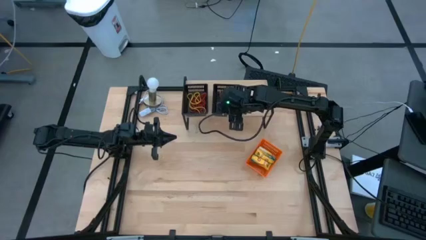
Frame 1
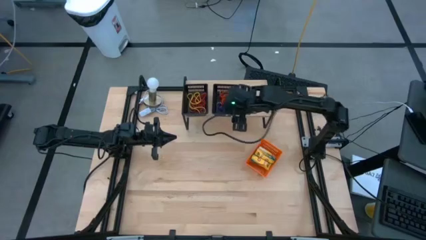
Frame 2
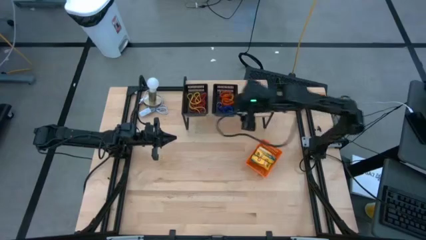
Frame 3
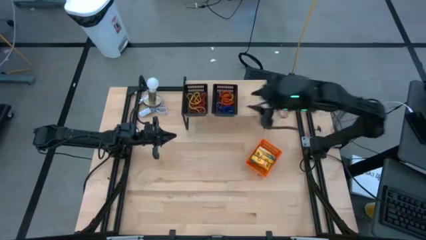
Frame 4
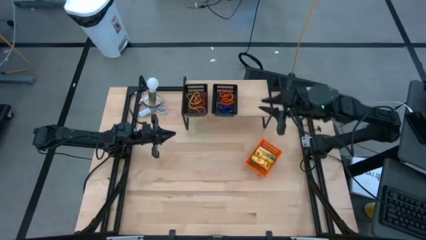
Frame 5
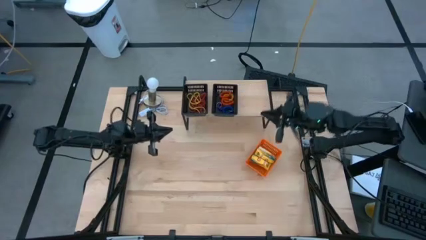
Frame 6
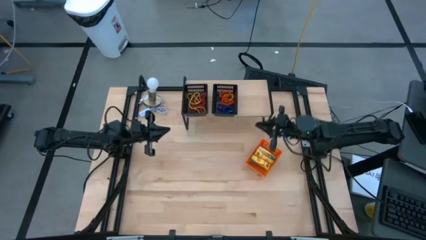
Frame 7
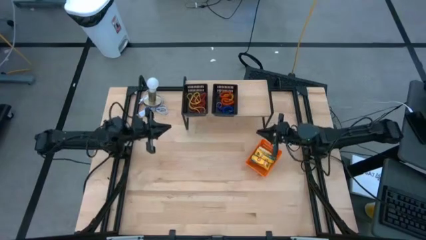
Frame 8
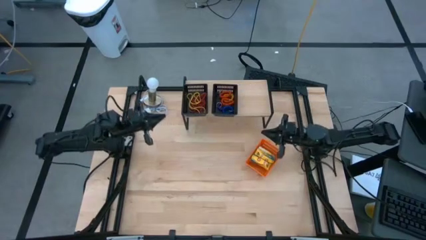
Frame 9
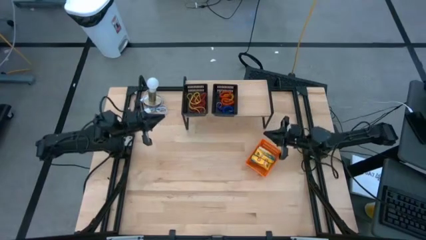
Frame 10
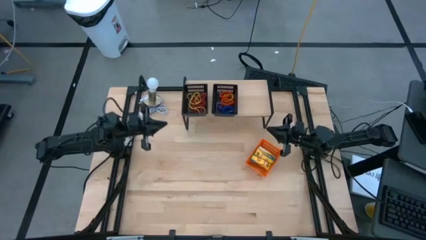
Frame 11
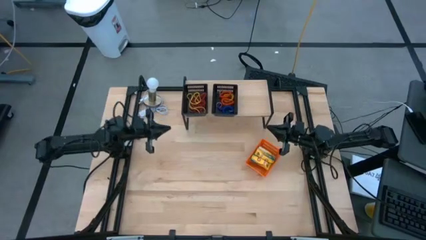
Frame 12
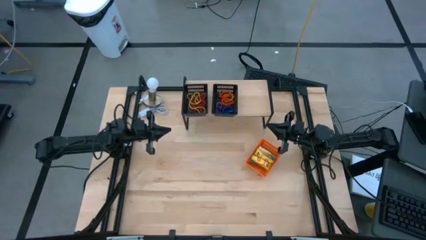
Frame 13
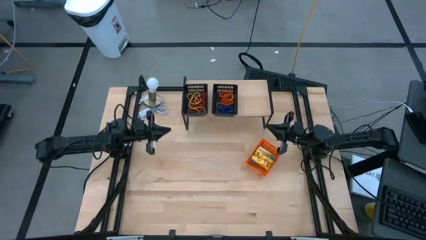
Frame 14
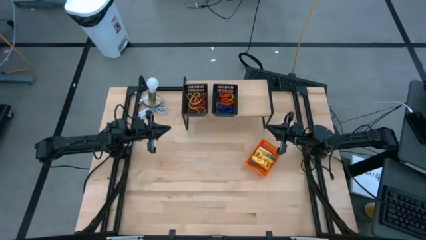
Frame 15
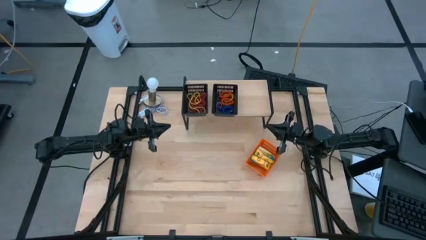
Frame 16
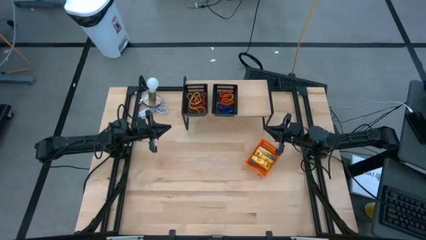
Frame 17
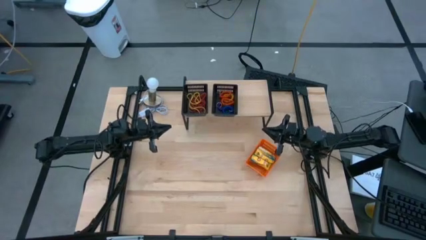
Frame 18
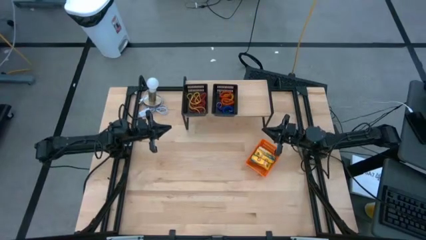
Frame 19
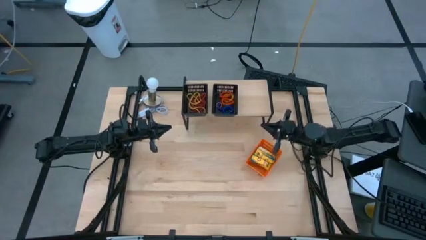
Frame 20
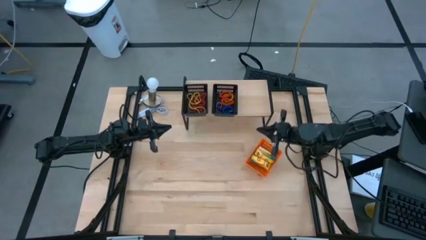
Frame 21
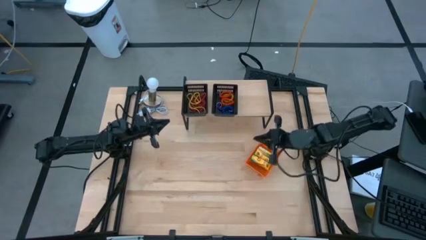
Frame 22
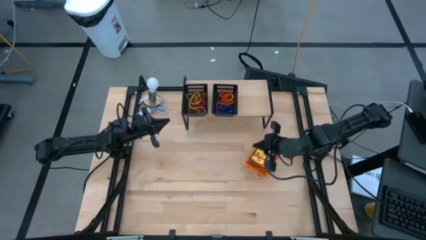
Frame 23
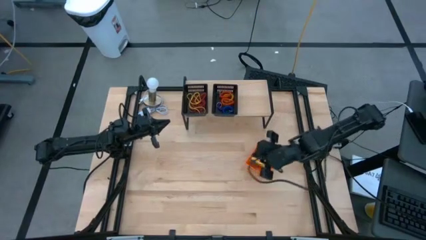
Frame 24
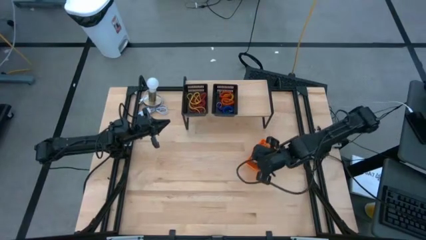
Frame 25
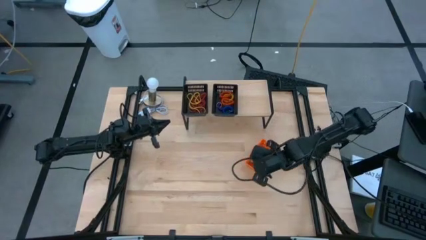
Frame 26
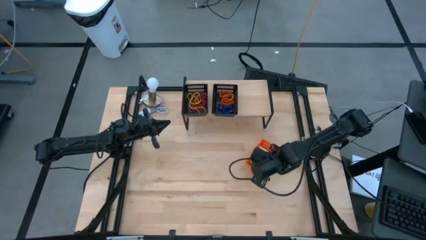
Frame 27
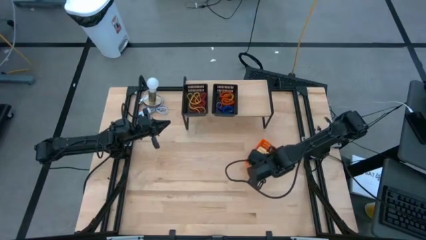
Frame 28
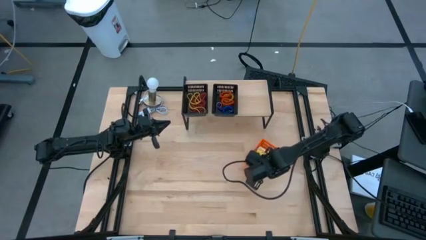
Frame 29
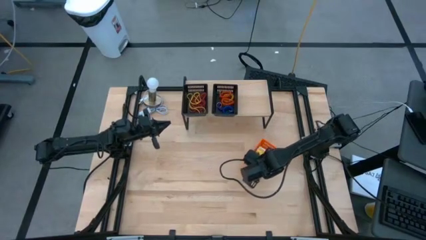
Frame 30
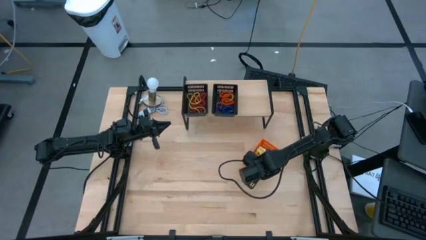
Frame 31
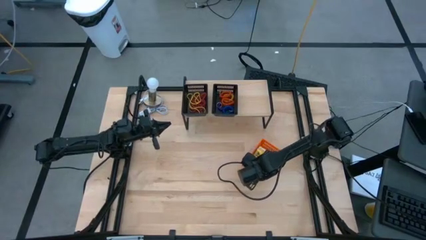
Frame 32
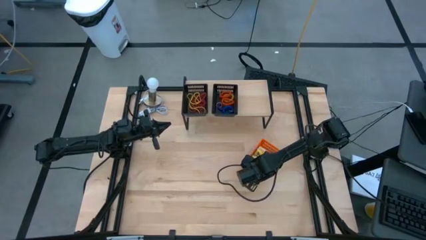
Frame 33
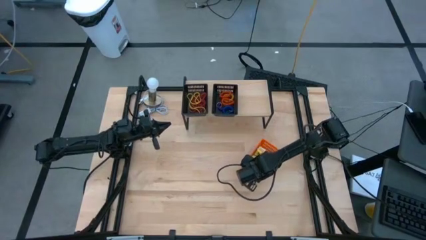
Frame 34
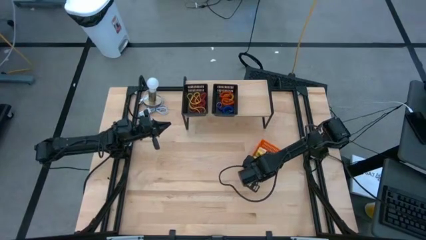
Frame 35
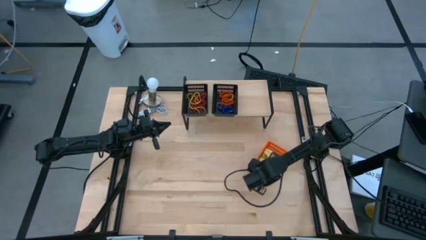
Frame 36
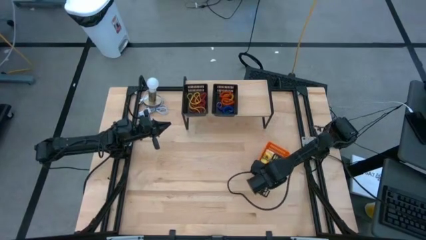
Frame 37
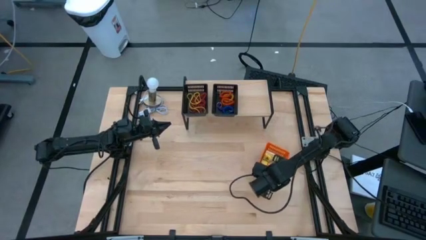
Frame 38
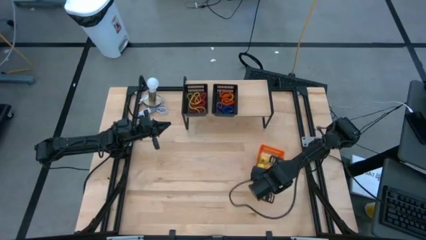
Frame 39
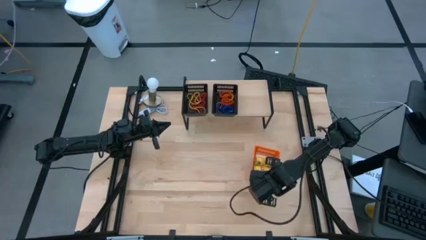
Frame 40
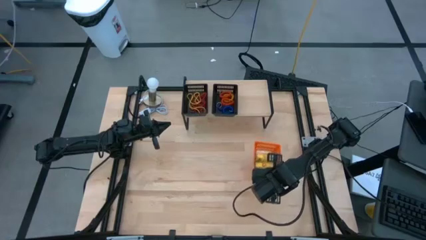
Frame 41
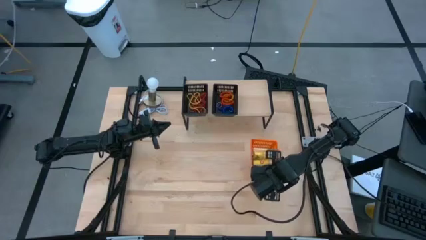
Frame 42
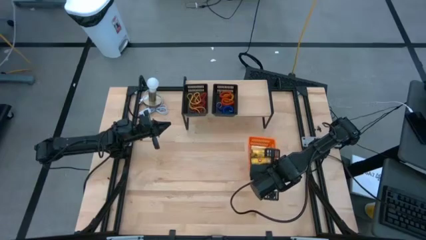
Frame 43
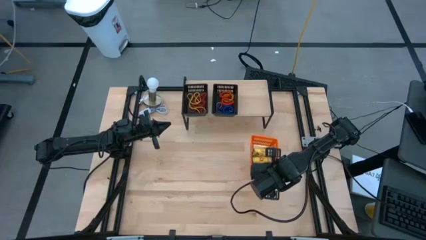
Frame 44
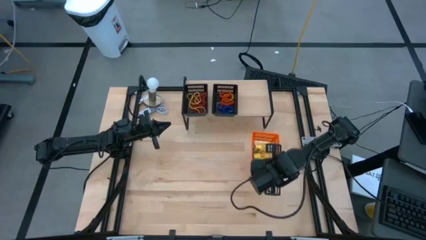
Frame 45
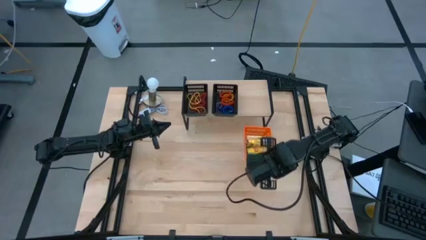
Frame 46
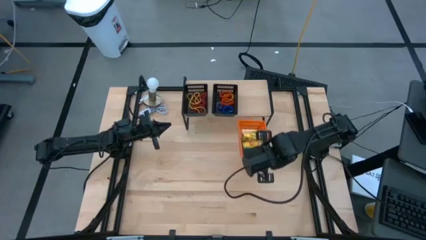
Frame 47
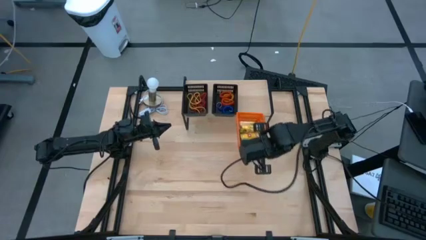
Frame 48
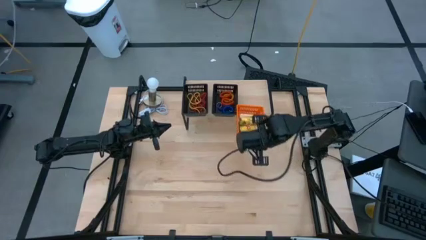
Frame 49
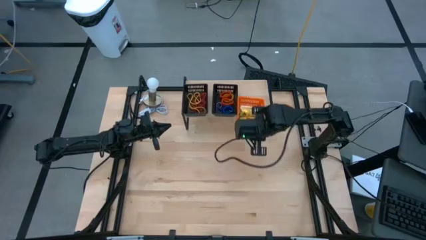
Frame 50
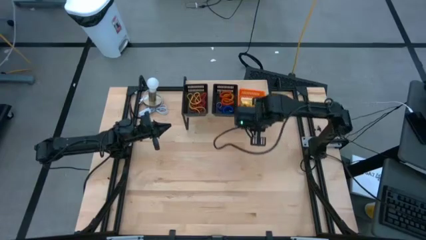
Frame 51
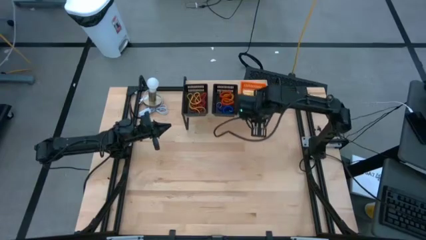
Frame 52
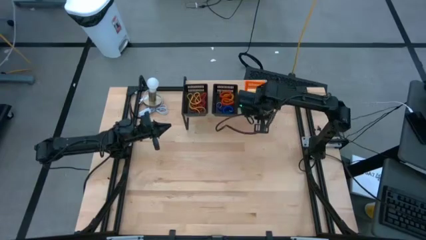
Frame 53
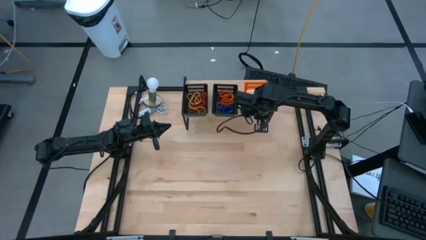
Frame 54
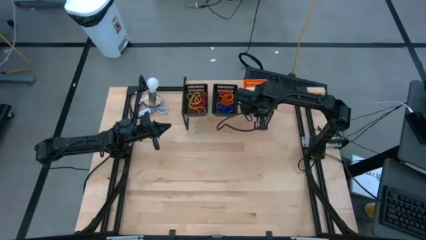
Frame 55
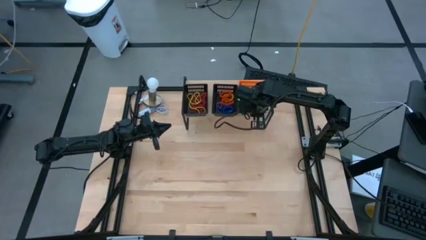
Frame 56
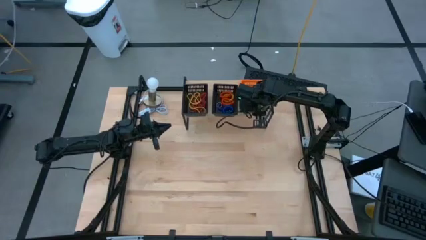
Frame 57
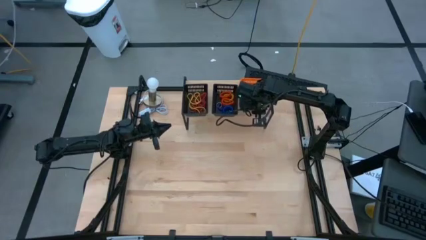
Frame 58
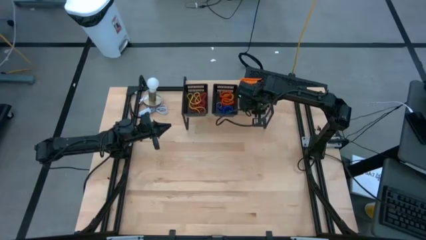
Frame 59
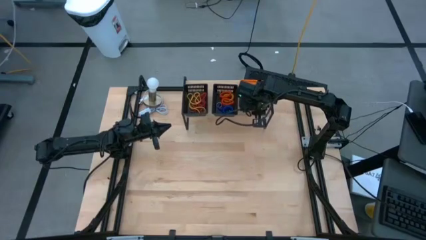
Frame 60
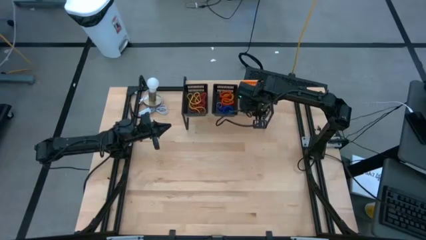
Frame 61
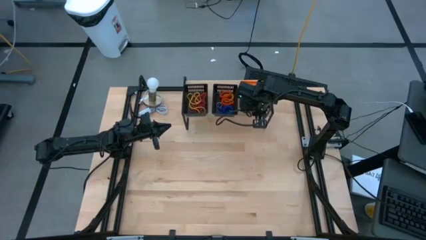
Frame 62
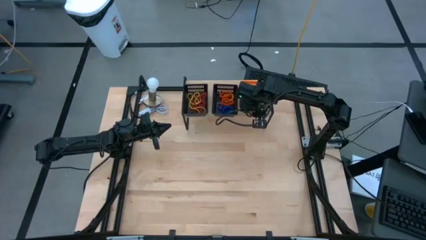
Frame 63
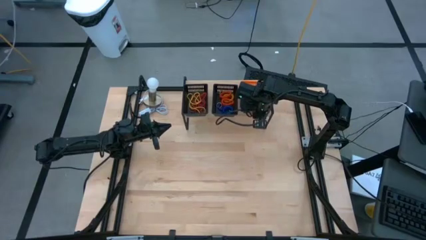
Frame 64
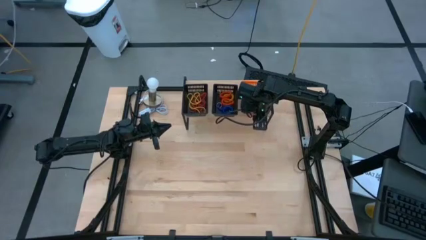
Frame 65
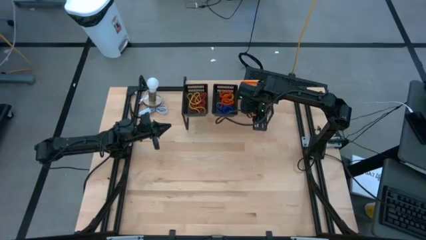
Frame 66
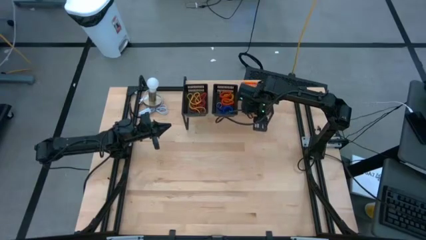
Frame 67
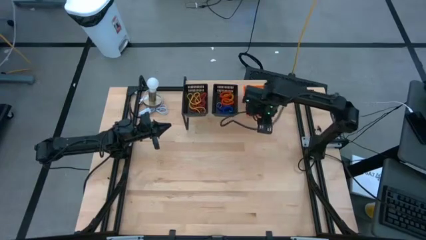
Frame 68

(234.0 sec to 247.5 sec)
Task: Pick & Place Office Desk Supplies
Put the orange bin filled with crayon boxes on the shelf
